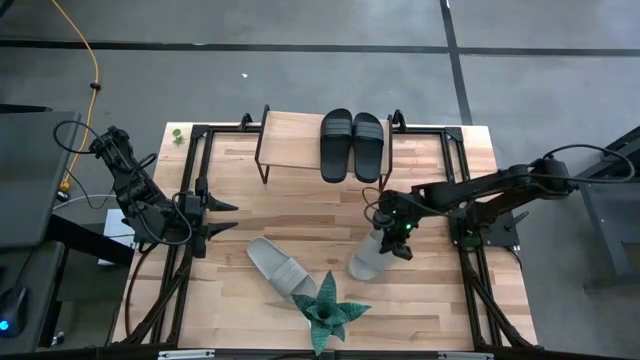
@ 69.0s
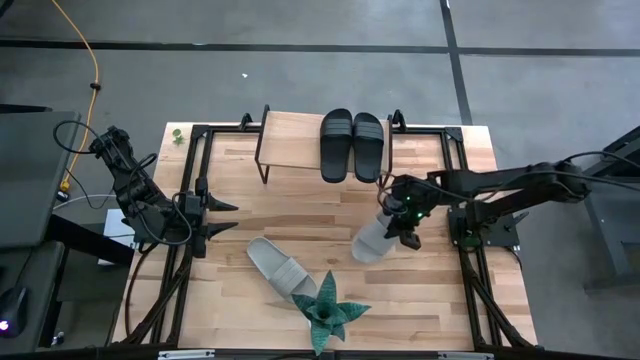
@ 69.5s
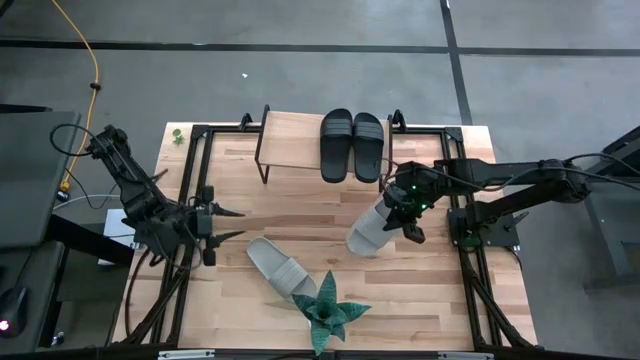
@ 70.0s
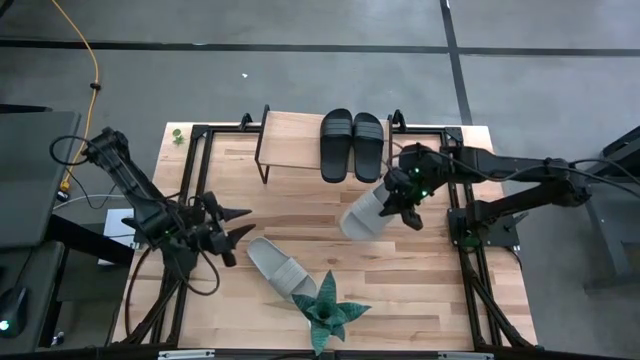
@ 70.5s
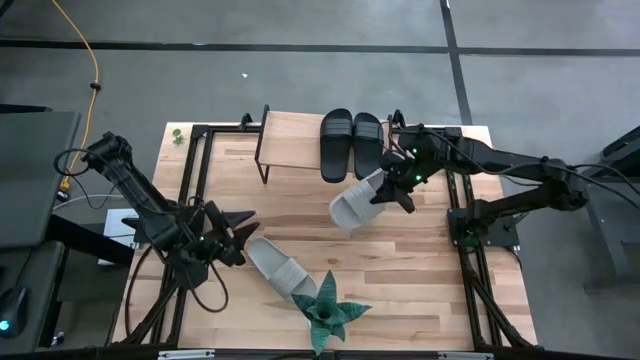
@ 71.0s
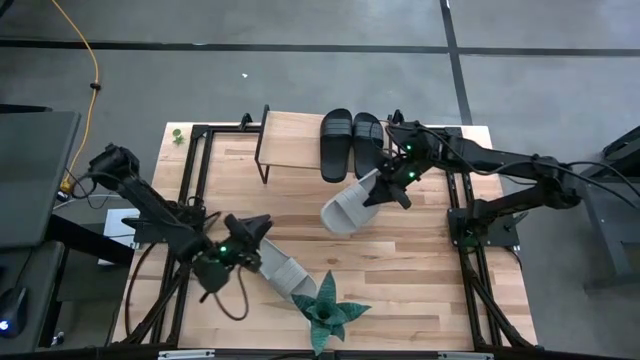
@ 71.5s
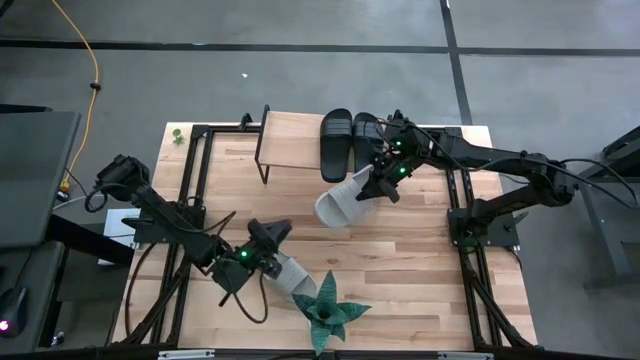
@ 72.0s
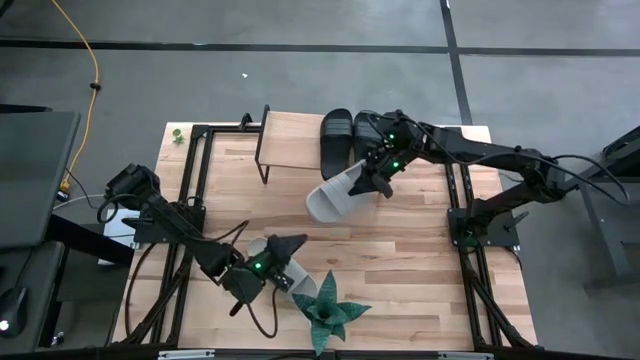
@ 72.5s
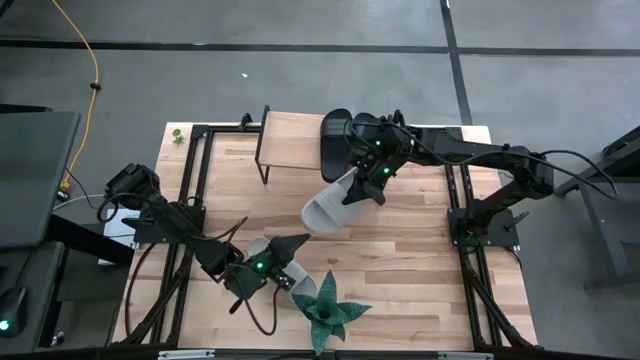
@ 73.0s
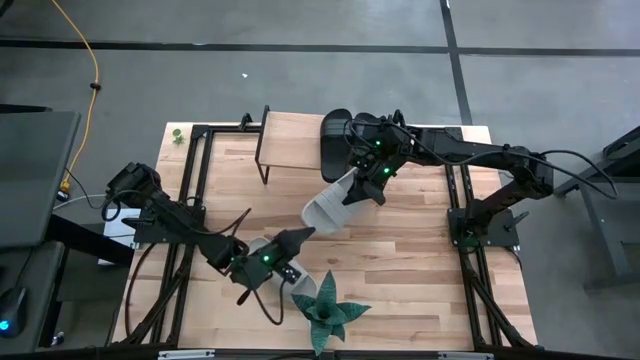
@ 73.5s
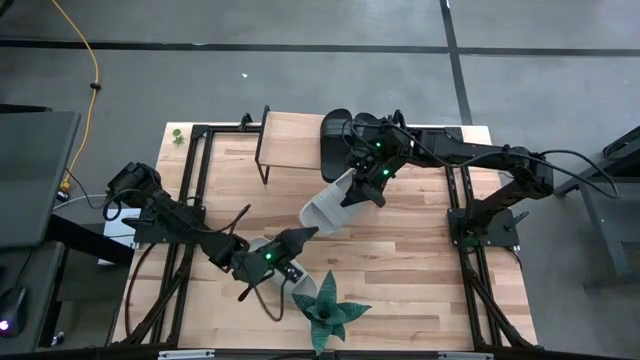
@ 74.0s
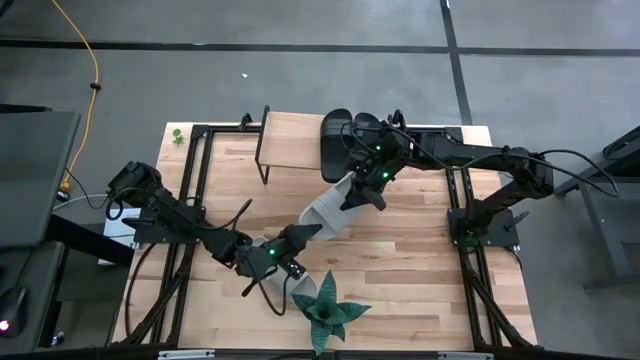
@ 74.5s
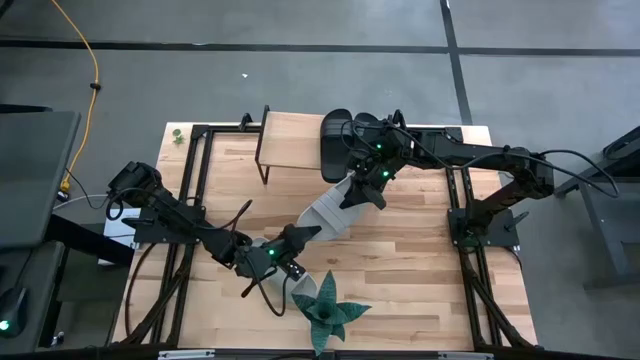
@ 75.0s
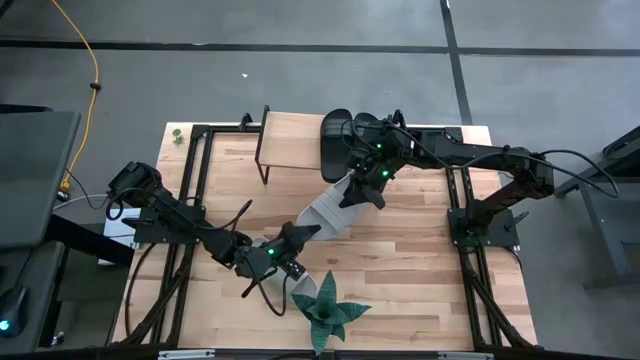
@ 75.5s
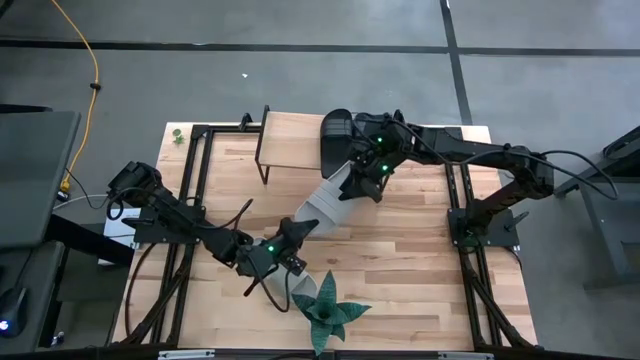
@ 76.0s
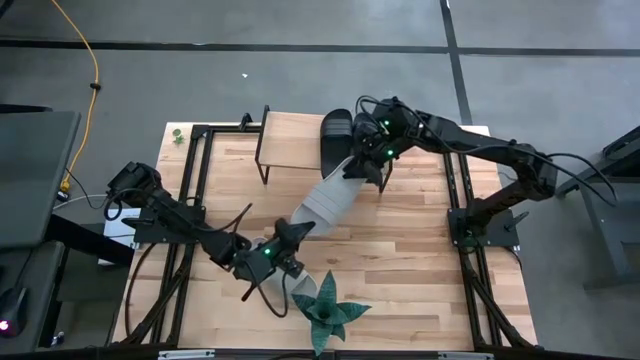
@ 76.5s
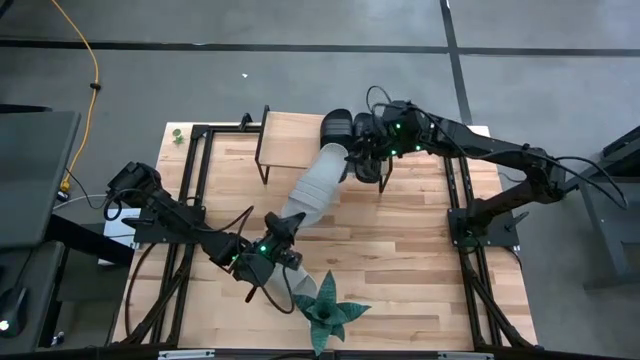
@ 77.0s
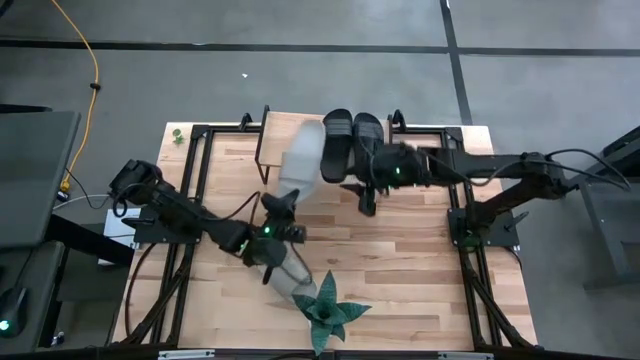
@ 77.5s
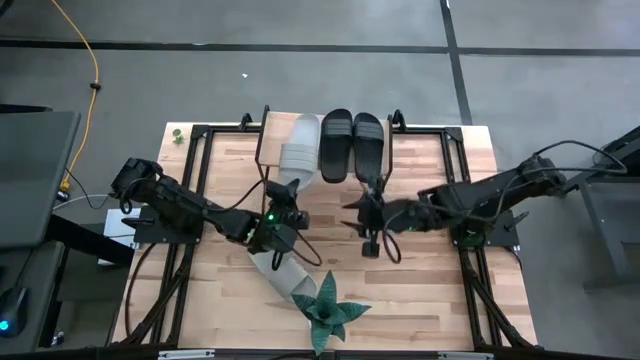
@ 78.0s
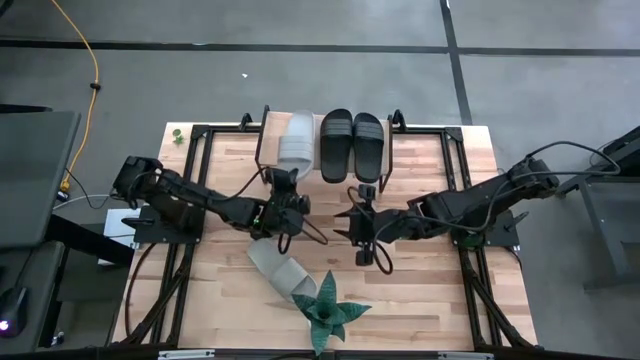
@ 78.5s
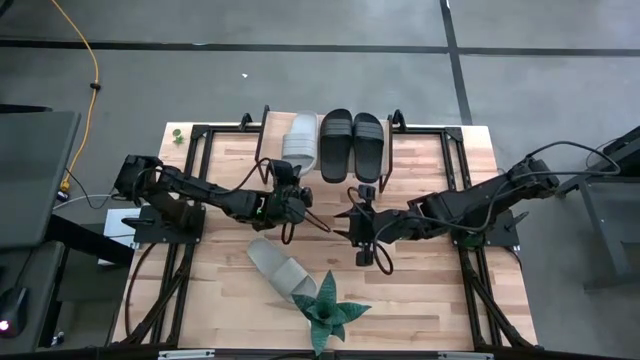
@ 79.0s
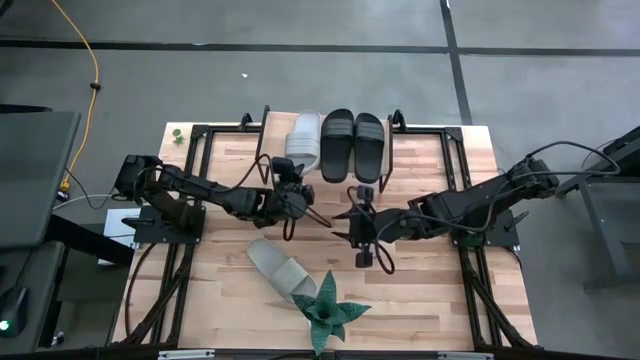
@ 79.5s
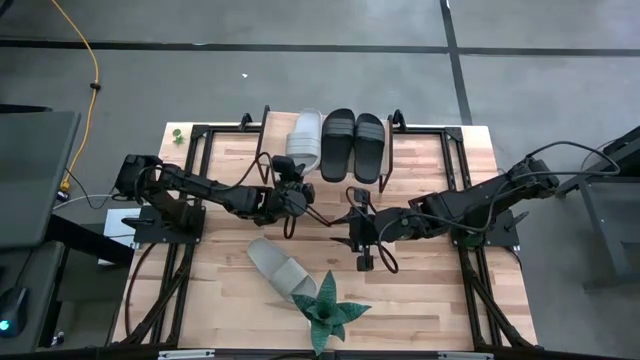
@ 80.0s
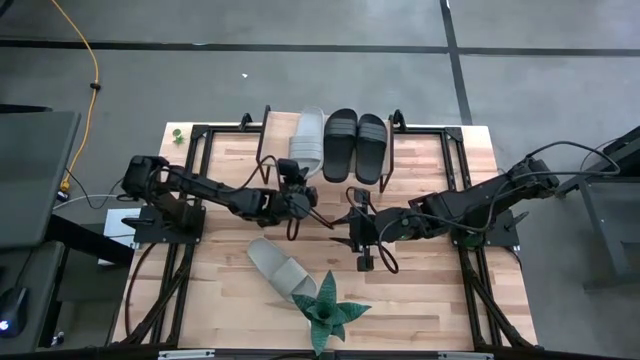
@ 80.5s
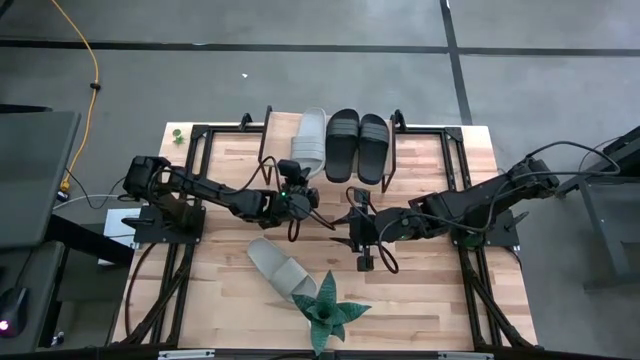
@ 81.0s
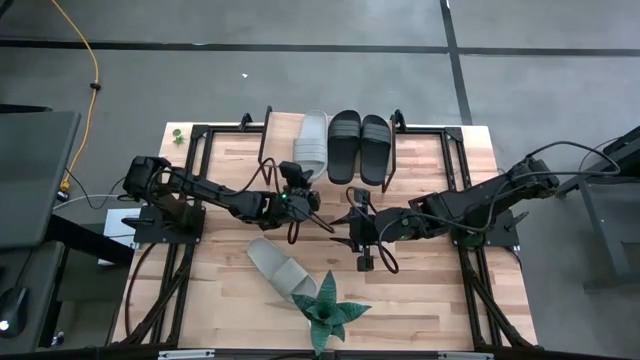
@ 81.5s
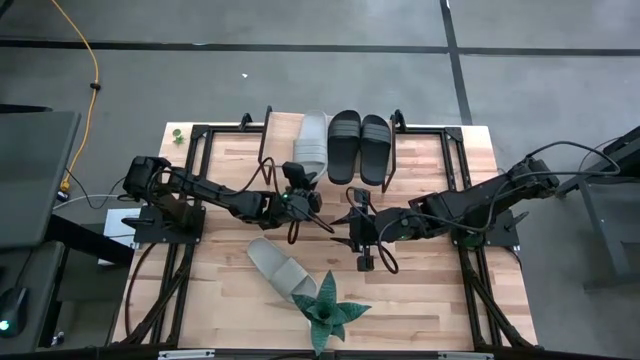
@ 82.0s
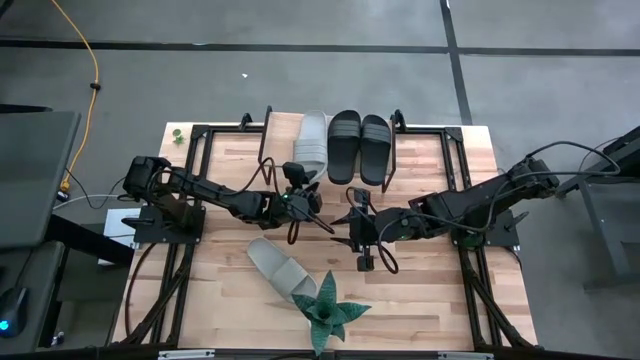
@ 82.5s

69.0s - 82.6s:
Task: Pick and place slides into the shelf
Put the right gray slipper on the shelf

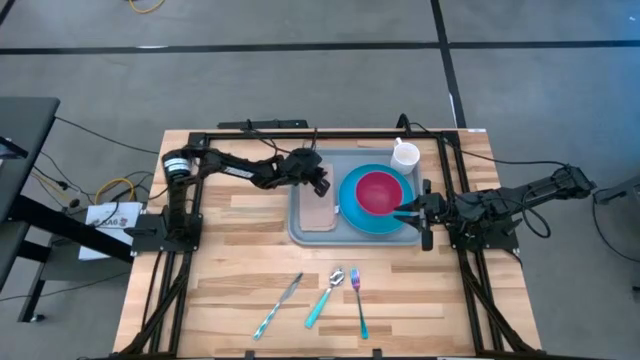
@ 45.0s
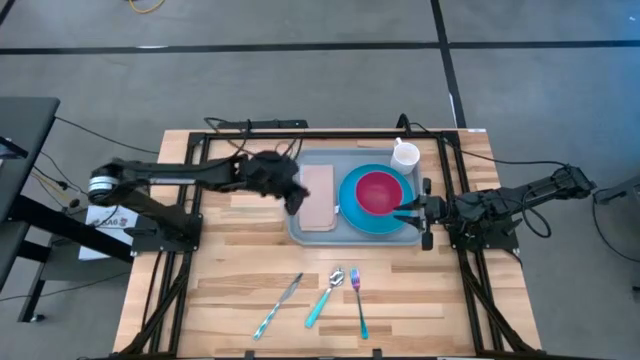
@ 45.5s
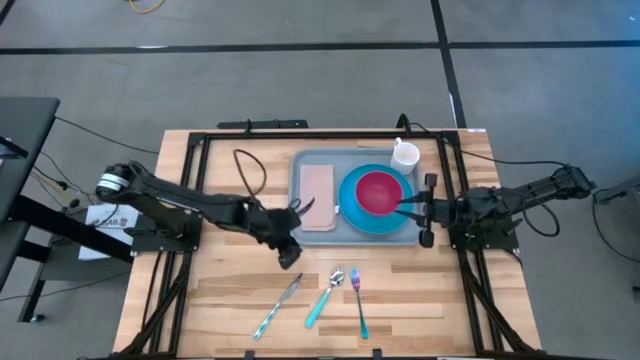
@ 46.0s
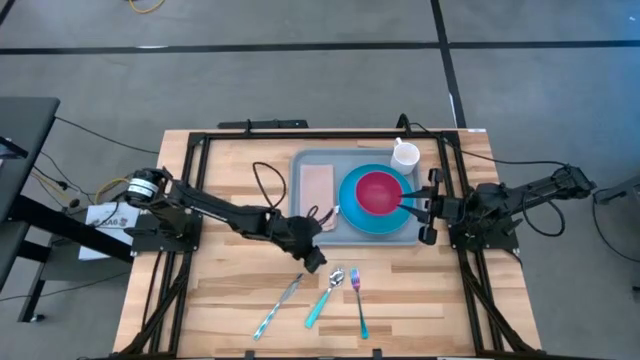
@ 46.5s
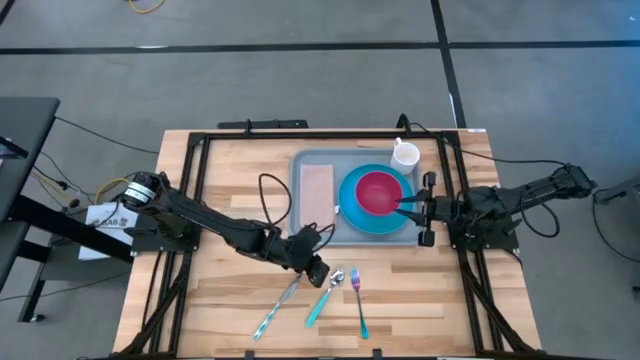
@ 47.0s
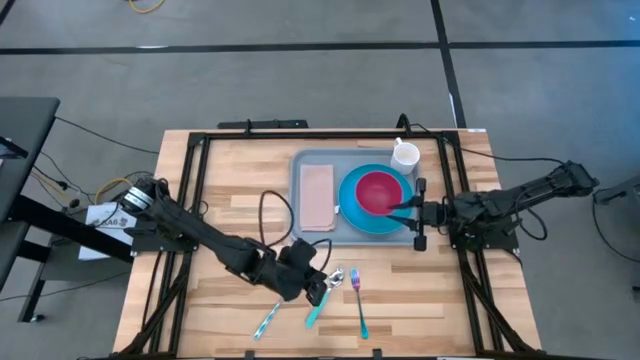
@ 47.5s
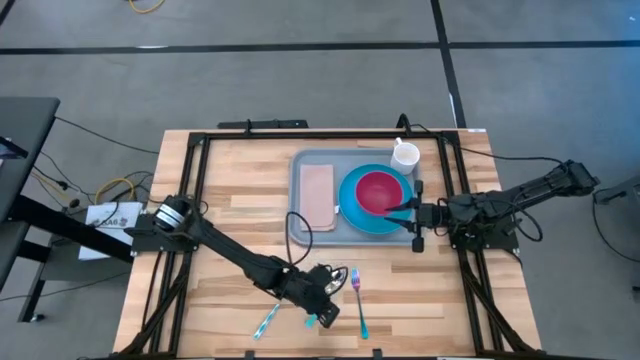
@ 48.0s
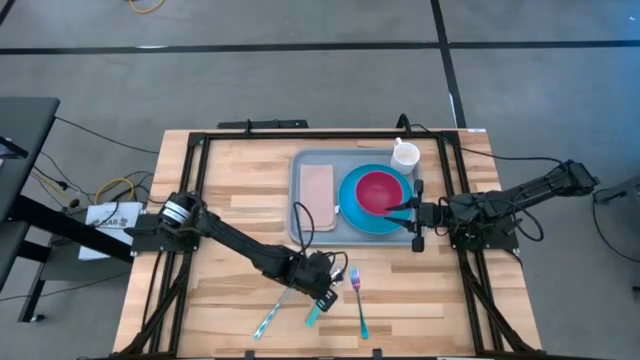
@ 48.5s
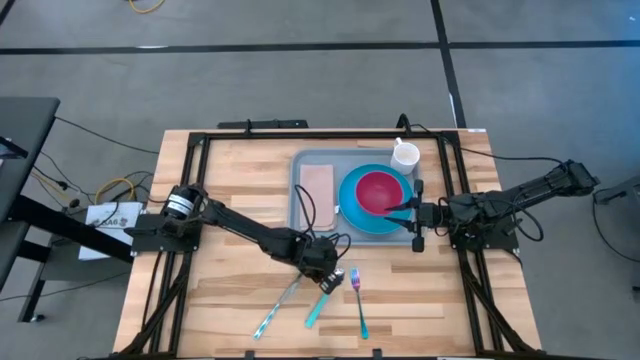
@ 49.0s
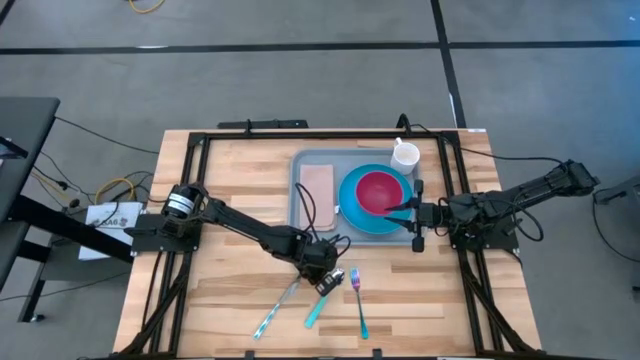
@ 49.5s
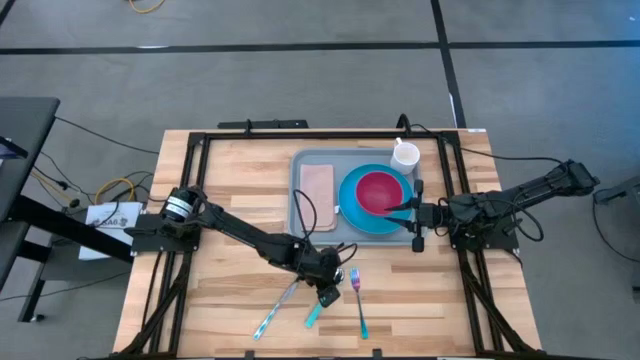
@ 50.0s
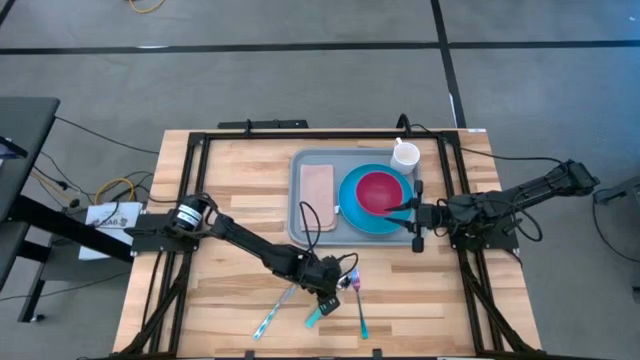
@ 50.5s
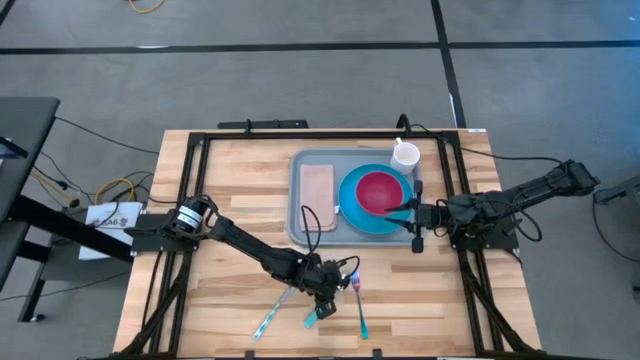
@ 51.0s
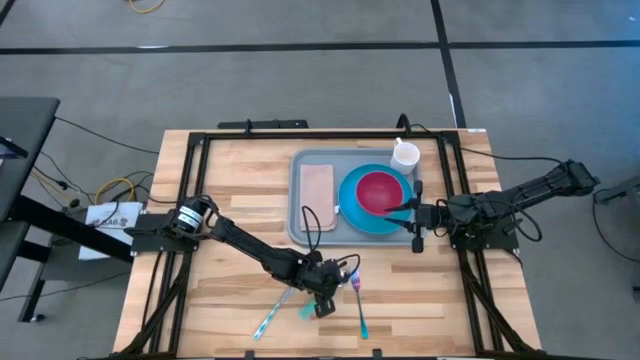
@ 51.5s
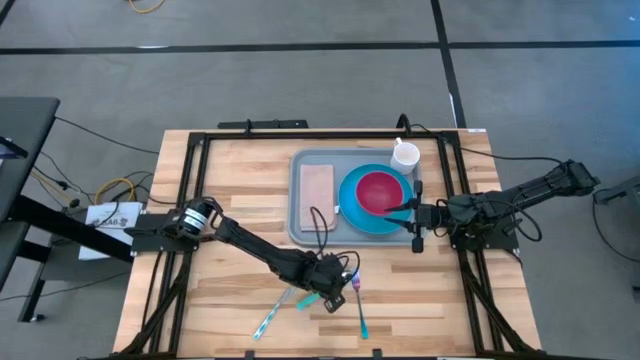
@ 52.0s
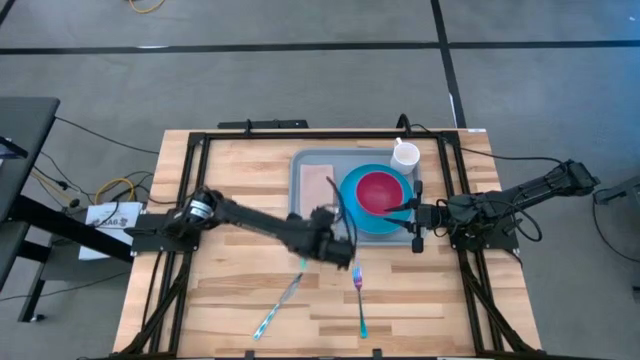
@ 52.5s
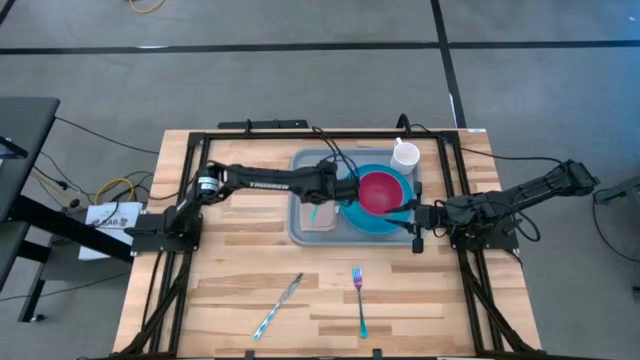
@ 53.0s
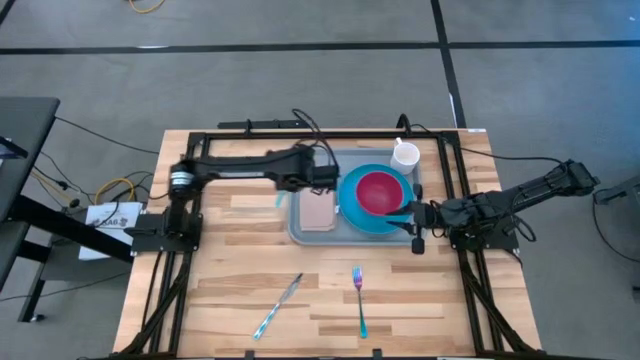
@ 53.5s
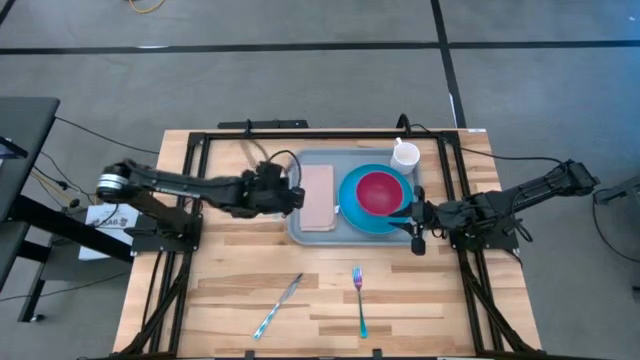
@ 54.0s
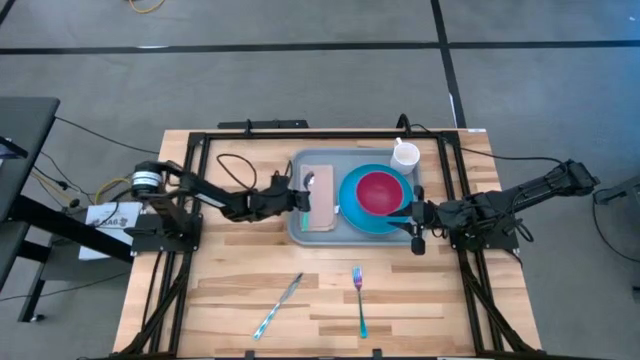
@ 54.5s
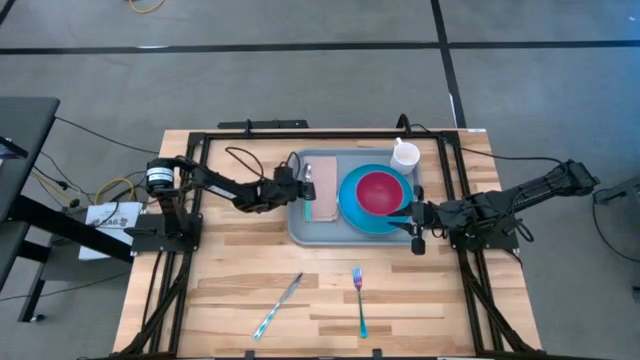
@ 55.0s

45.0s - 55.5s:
Task: Set up tray
Put the green spoon on the light brown table napkin on the gray serving tray
